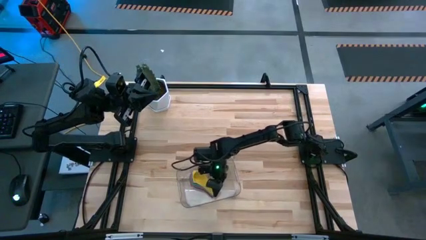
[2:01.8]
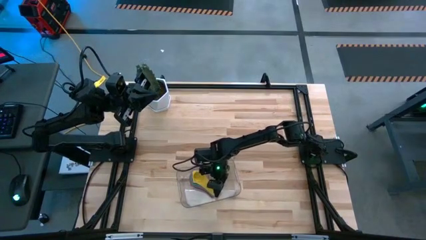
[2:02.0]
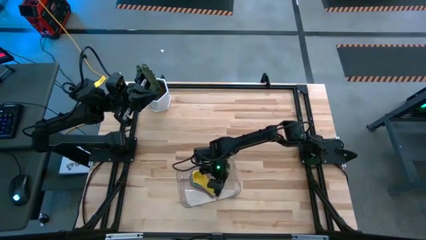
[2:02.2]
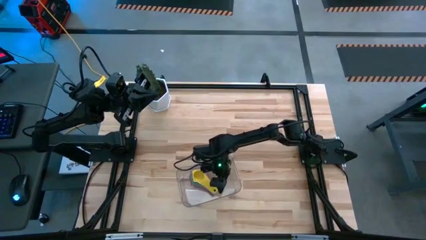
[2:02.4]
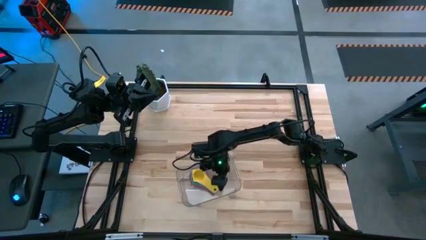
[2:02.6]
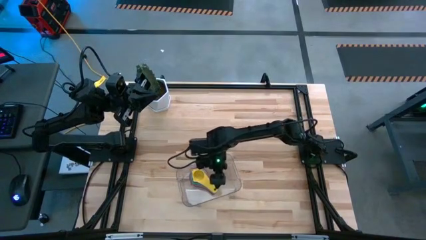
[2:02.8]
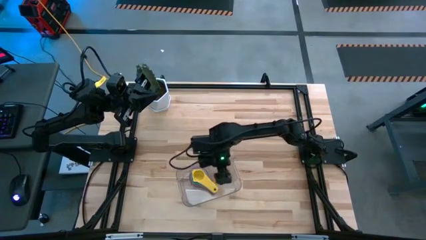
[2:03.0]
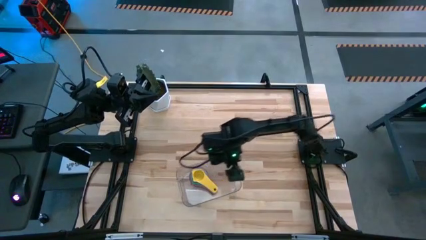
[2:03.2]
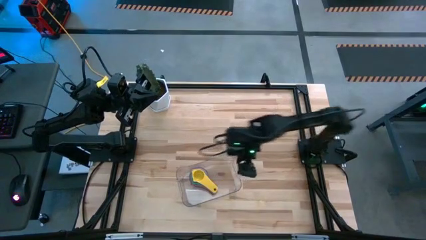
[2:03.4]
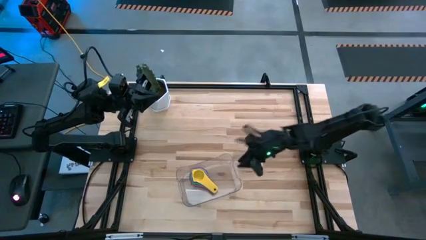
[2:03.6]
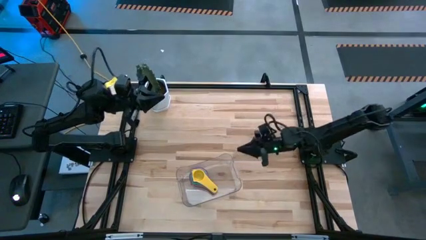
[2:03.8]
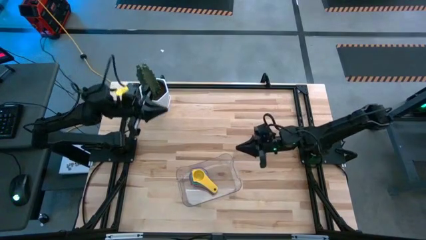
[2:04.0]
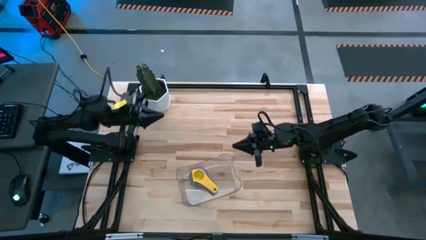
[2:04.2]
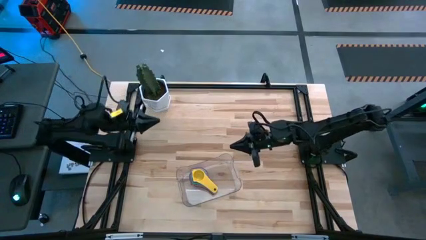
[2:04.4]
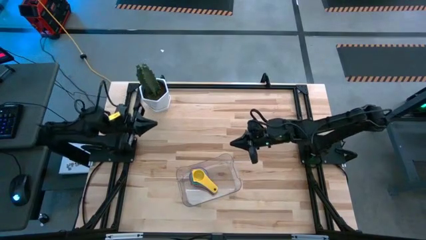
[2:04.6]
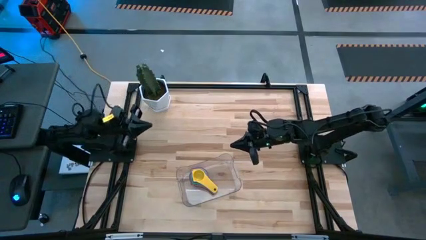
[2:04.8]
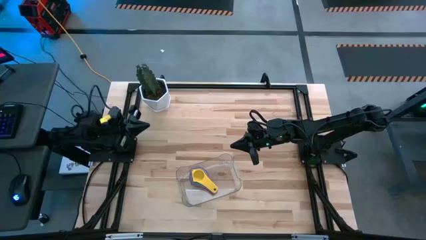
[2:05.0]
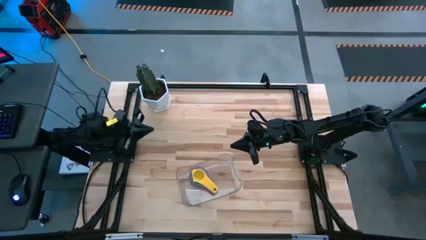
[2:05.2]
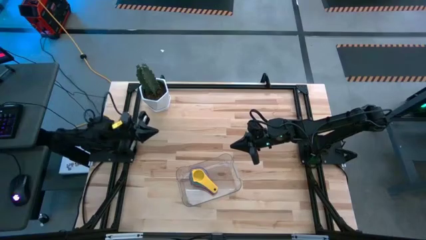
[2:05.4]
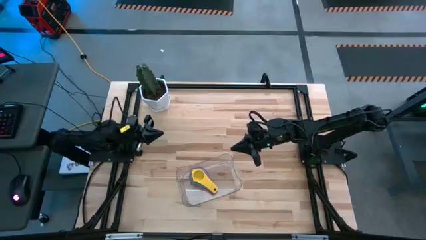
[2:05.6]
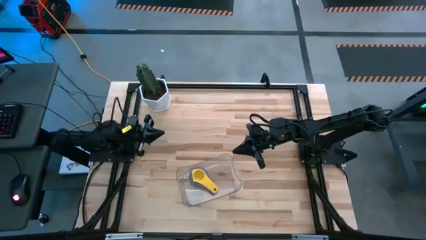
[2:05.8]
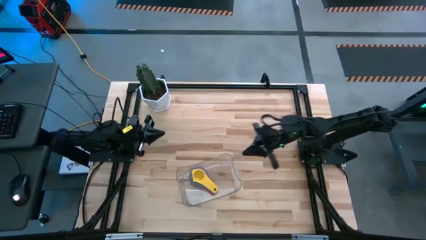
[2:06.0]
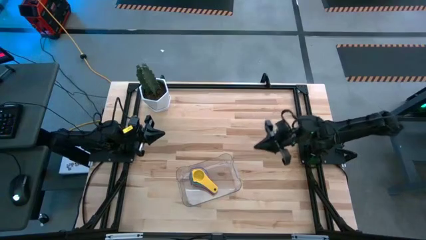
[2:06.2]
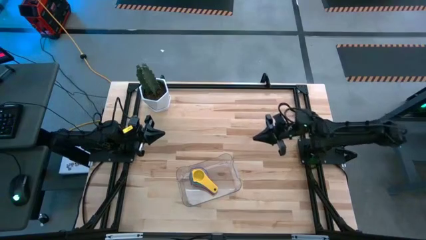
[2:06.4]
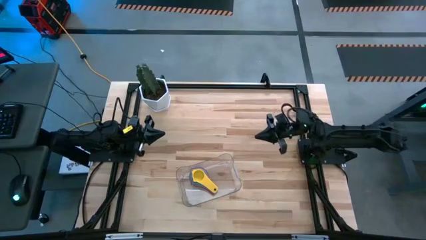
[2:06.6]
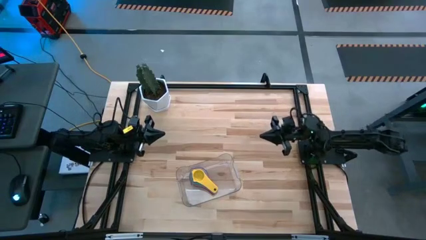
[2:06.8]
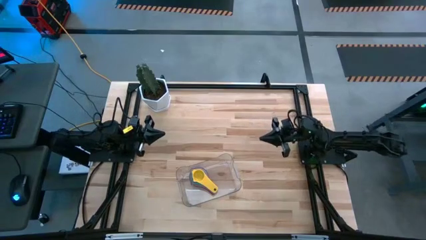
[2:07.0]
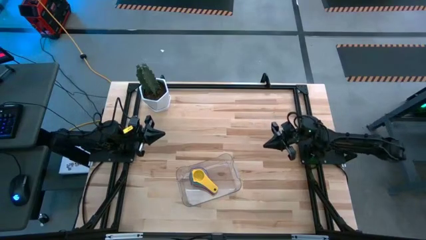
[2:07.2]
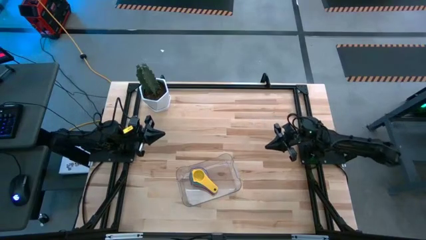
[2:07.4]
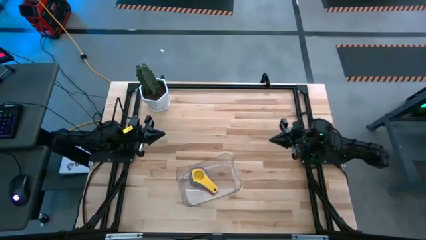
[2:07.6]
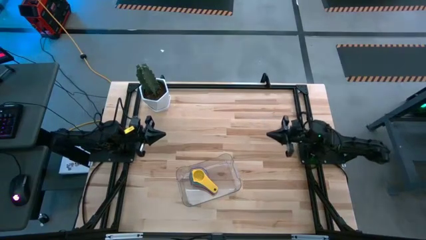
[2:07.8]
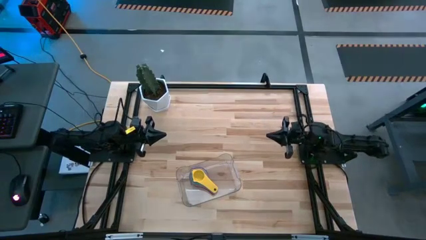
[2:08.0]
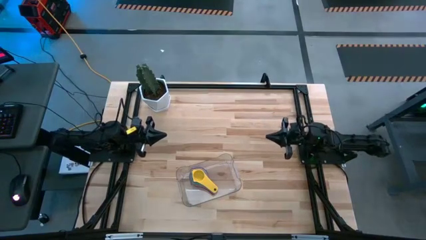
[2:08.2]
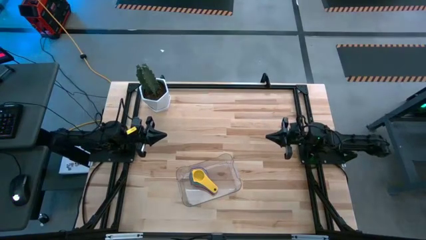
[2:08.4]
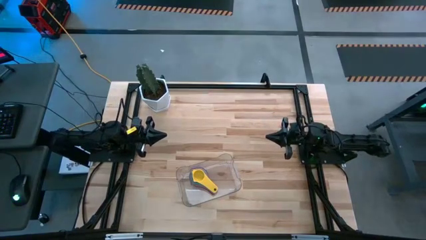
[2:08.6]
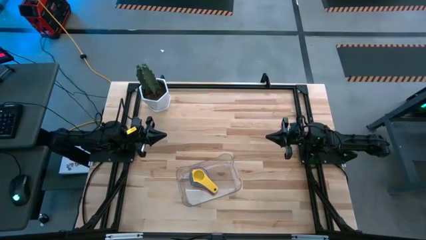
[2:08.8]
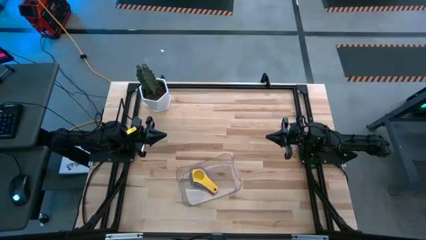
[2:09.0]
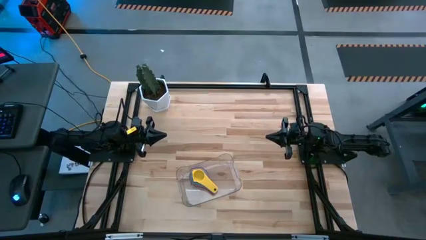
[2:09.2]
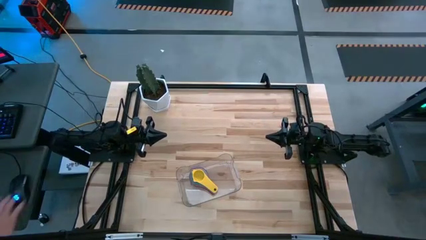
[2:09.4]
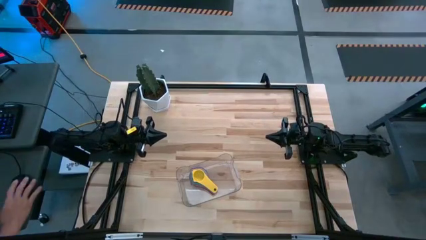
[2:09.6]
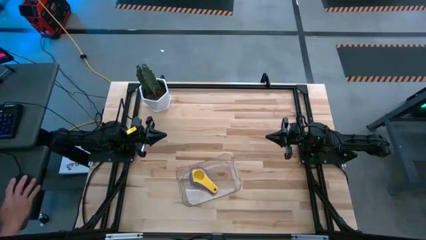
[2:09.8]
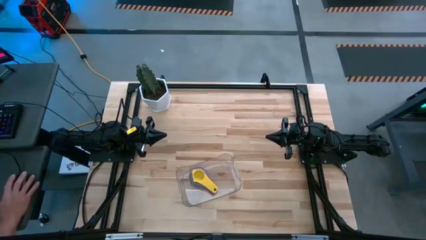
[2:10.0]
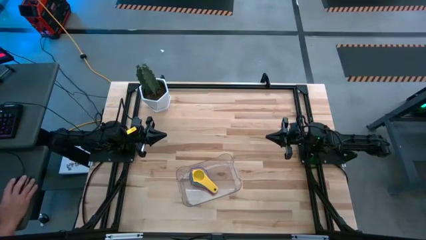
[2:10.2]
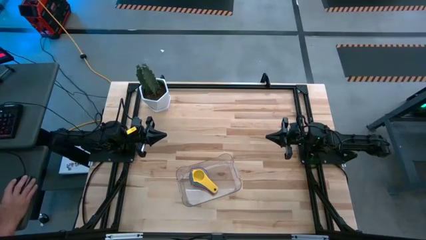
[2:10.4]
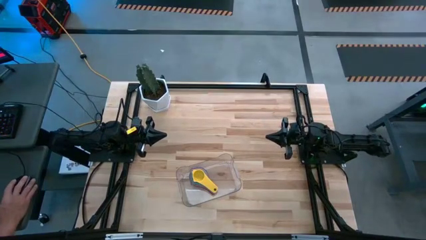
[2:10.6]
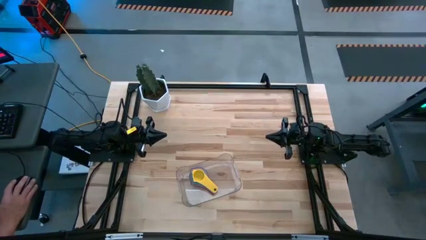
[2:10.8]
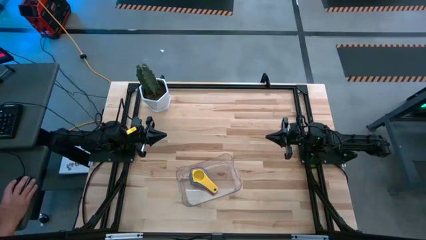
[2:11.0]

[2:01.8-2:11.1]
Task: Nest measuring cups in basket
Return to Home Position
